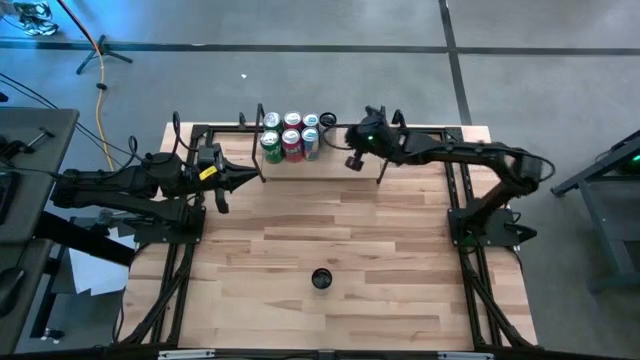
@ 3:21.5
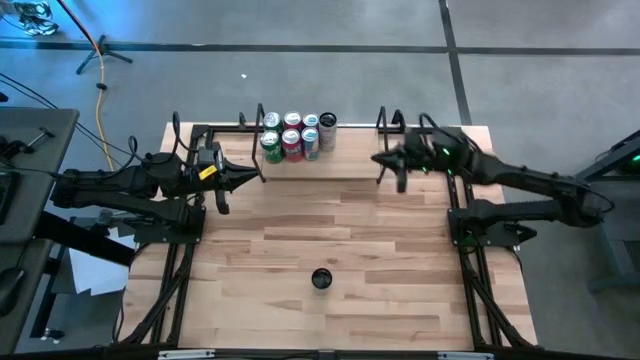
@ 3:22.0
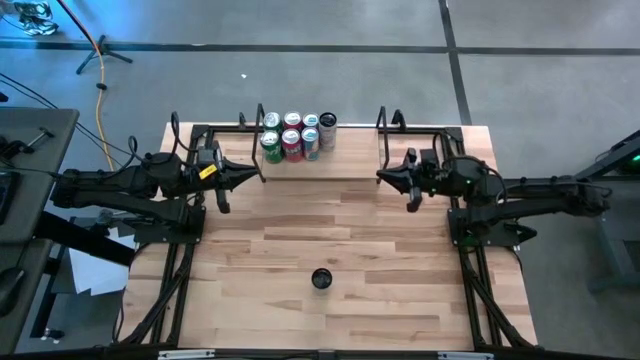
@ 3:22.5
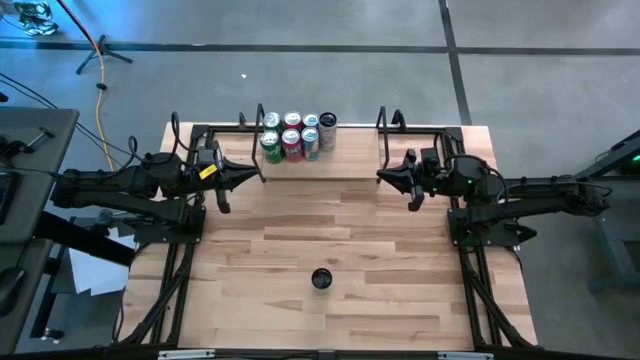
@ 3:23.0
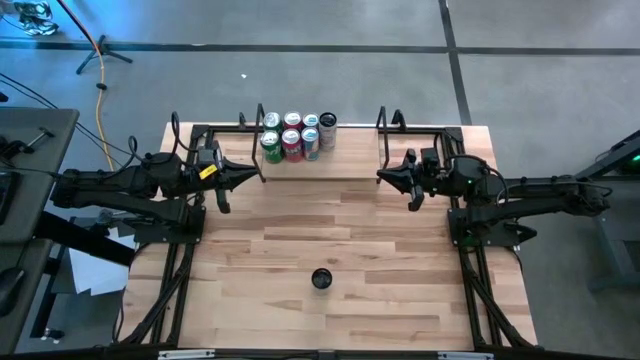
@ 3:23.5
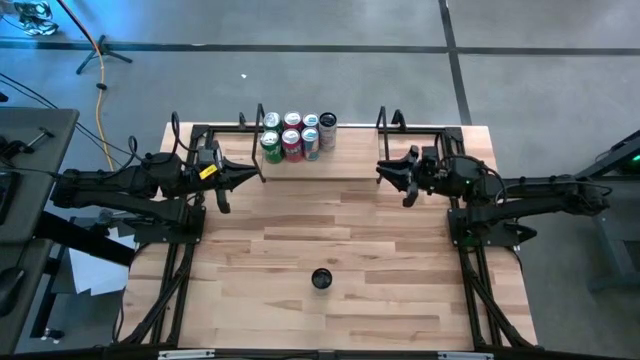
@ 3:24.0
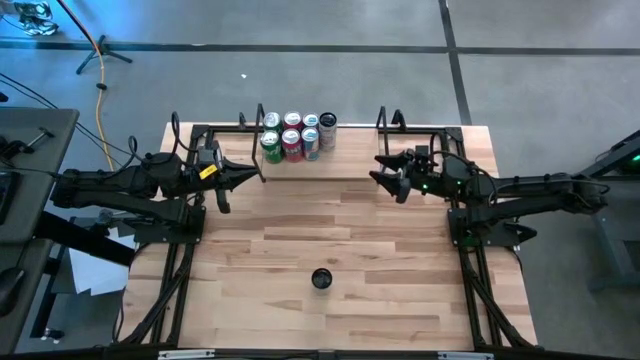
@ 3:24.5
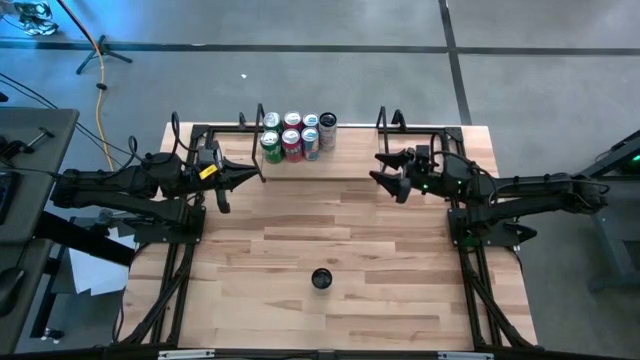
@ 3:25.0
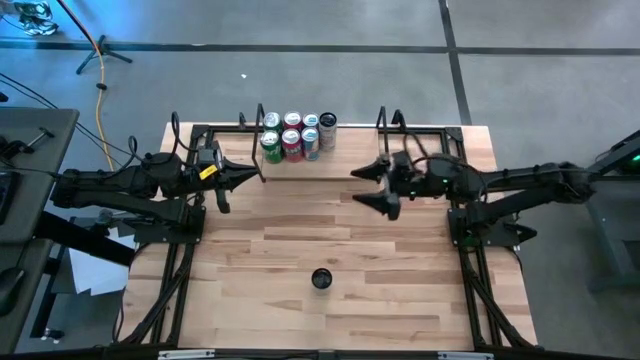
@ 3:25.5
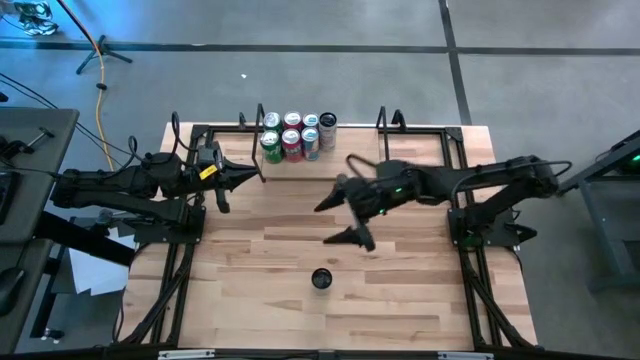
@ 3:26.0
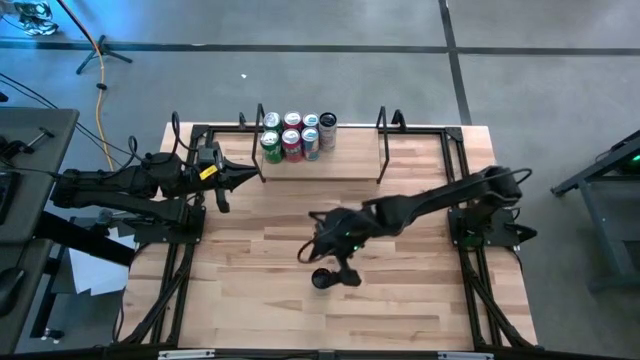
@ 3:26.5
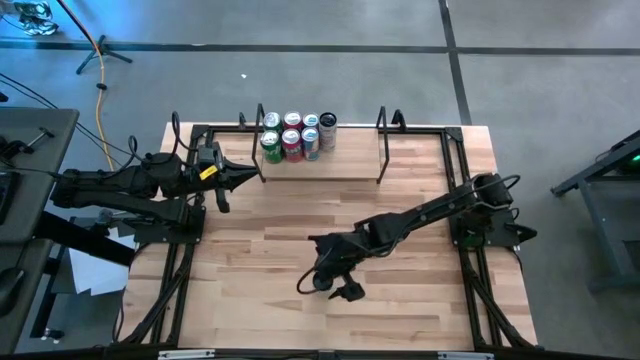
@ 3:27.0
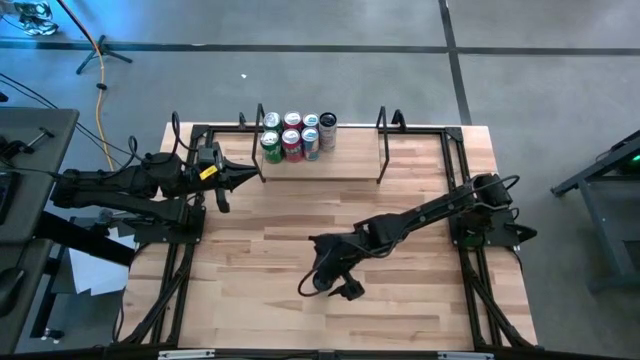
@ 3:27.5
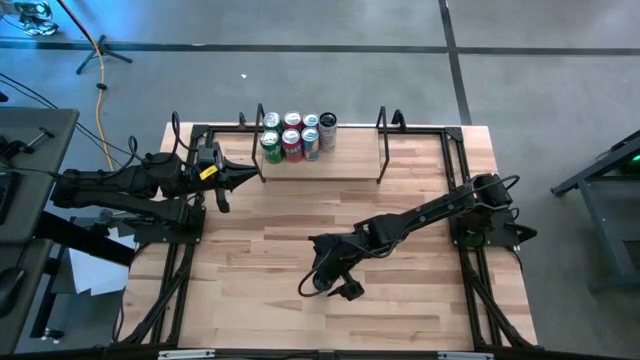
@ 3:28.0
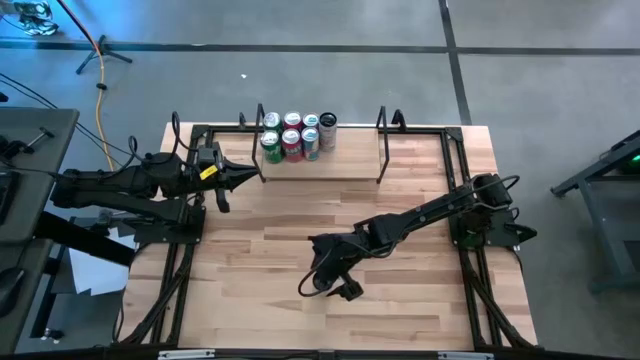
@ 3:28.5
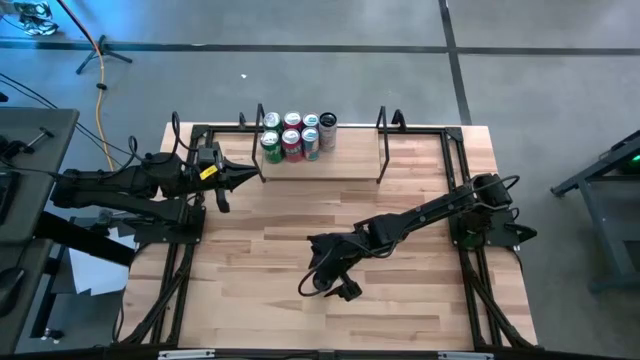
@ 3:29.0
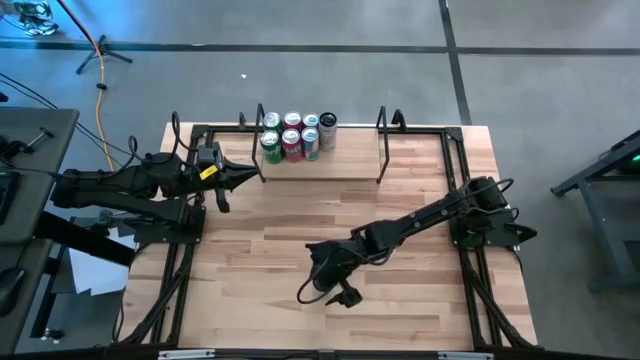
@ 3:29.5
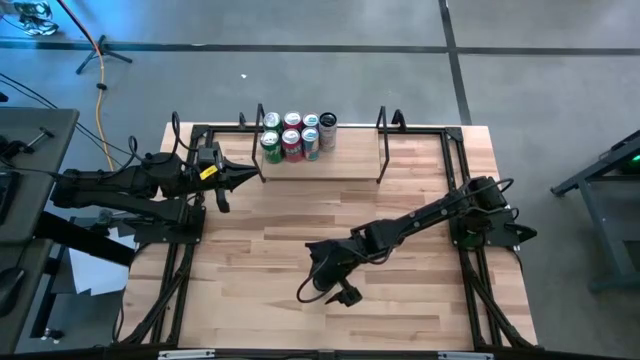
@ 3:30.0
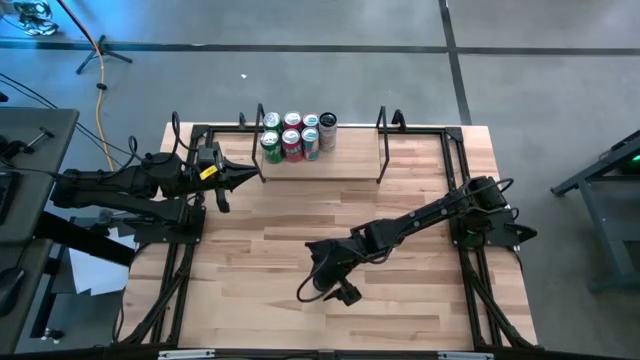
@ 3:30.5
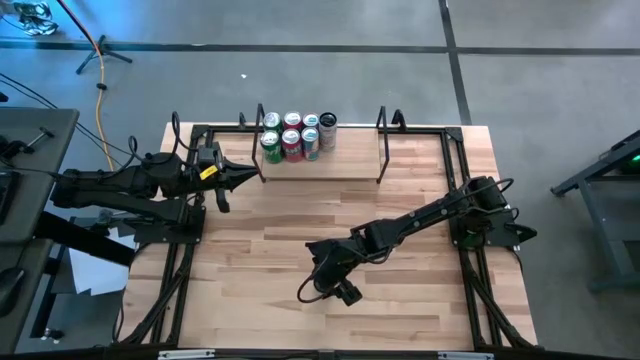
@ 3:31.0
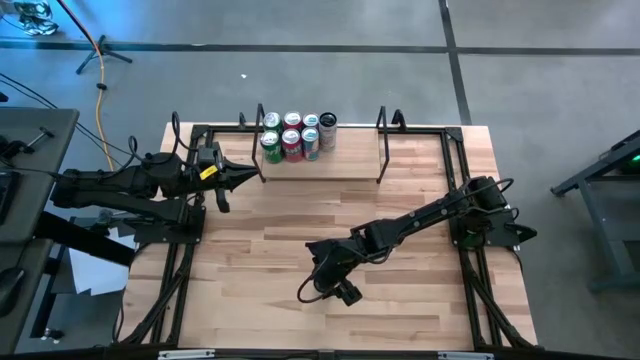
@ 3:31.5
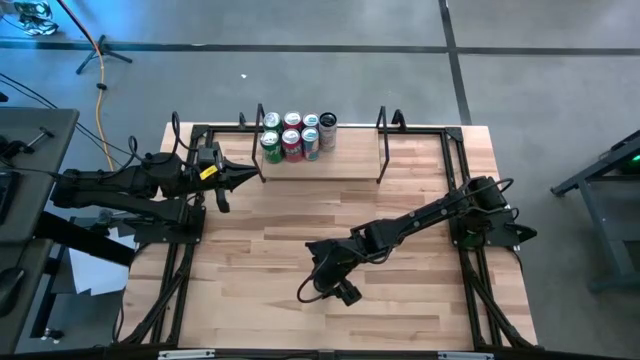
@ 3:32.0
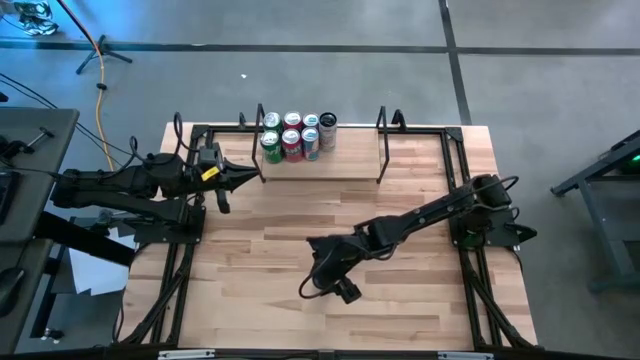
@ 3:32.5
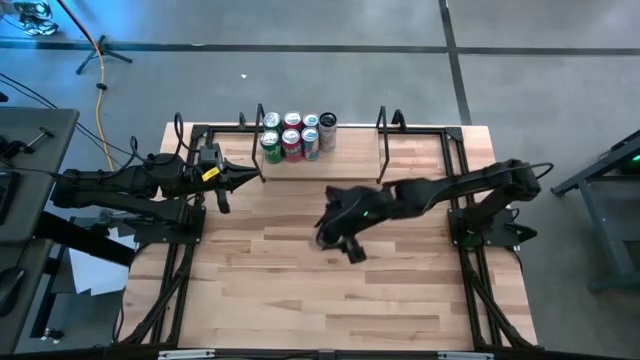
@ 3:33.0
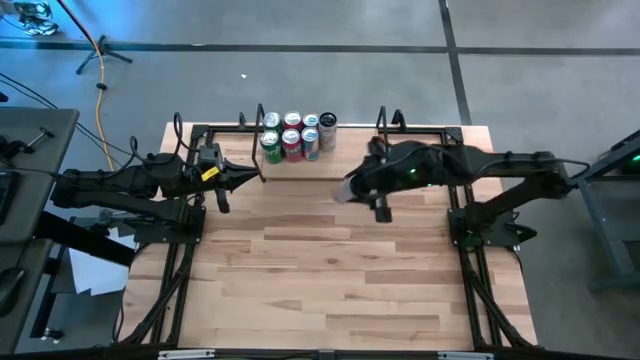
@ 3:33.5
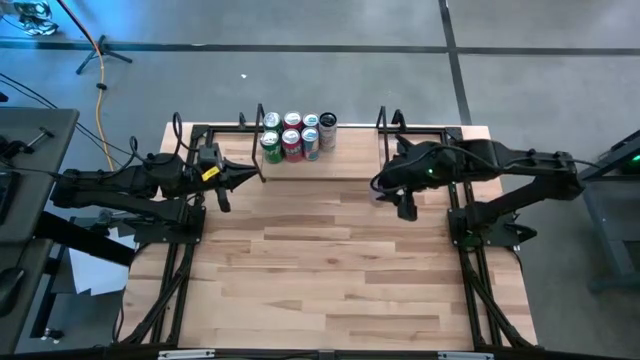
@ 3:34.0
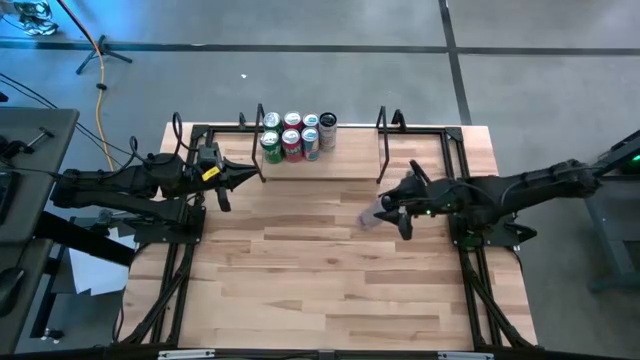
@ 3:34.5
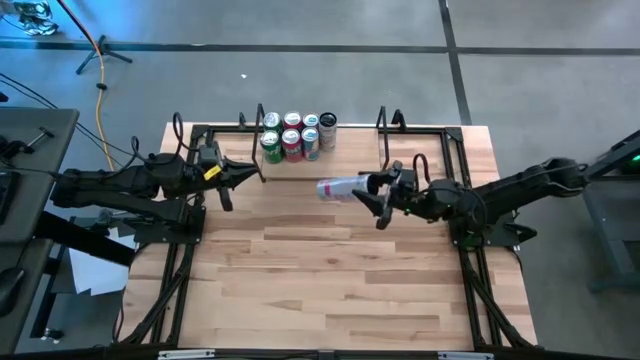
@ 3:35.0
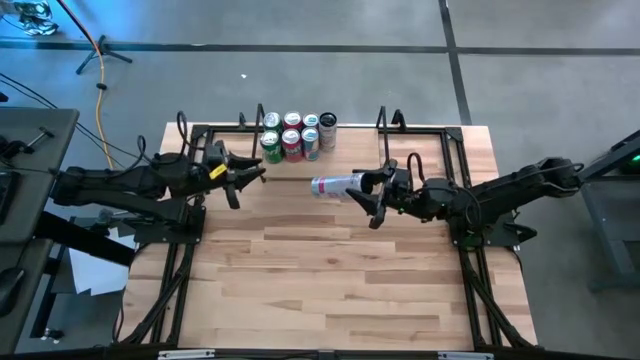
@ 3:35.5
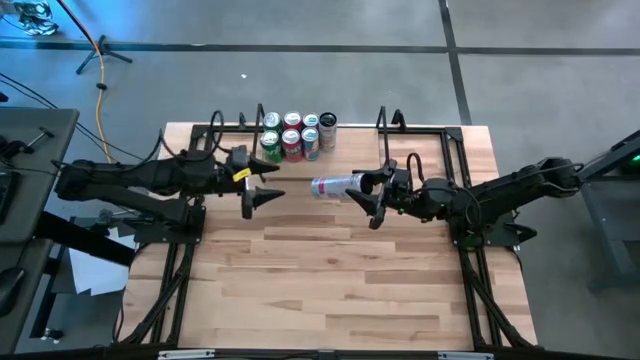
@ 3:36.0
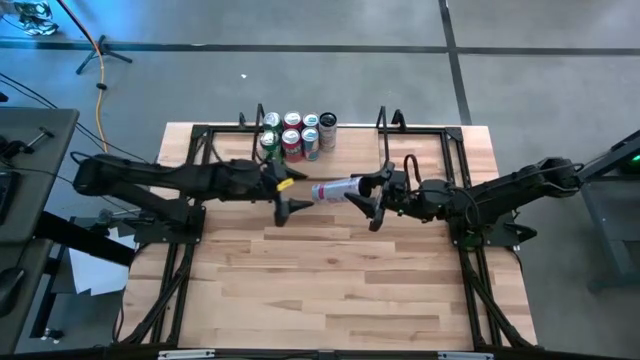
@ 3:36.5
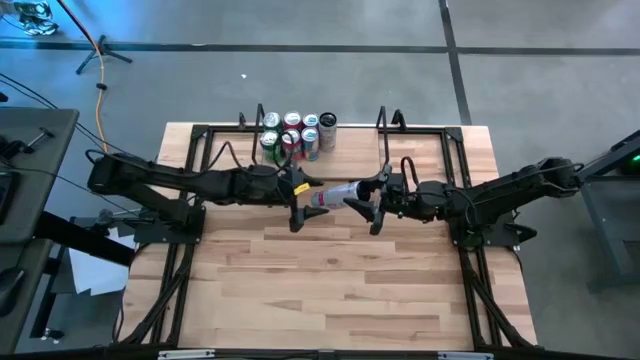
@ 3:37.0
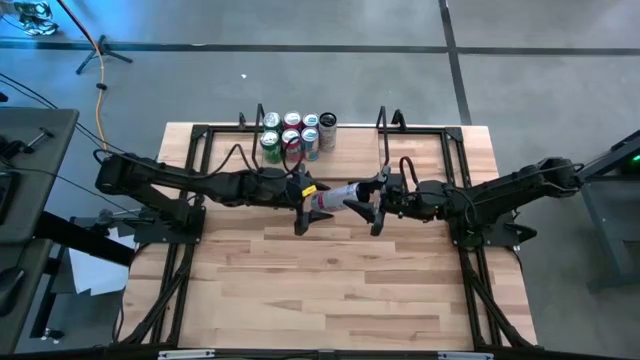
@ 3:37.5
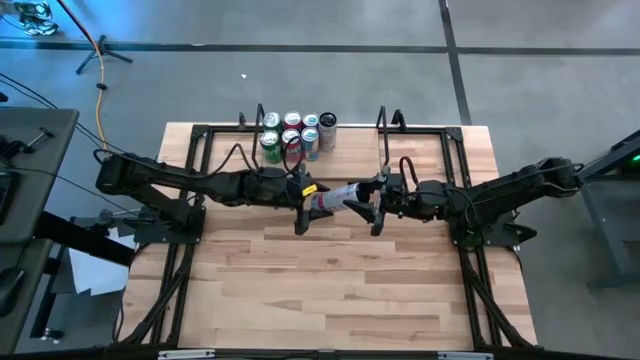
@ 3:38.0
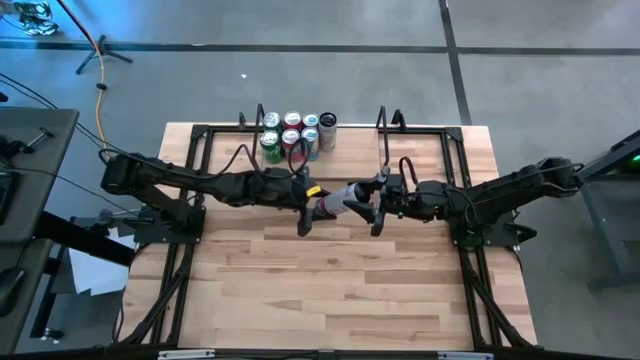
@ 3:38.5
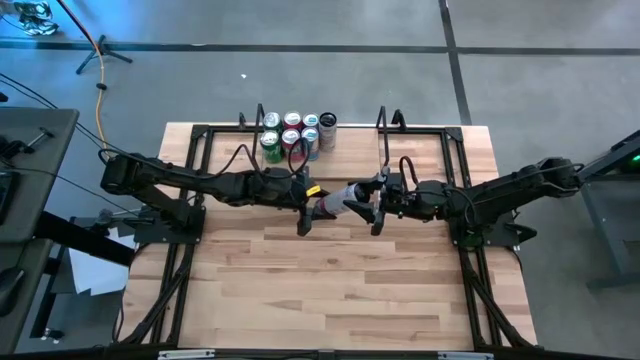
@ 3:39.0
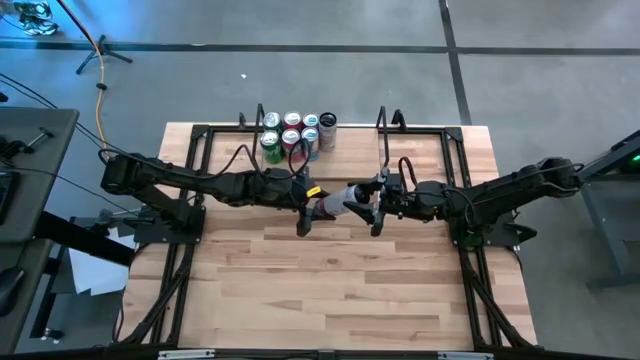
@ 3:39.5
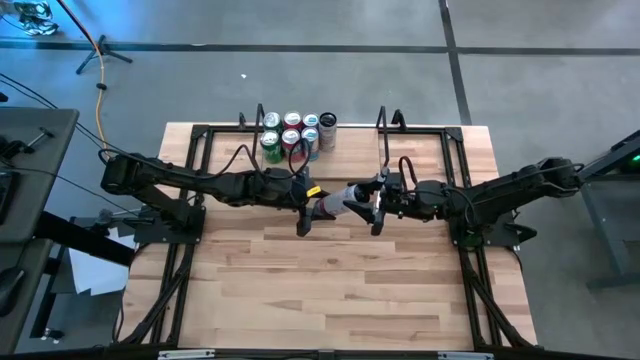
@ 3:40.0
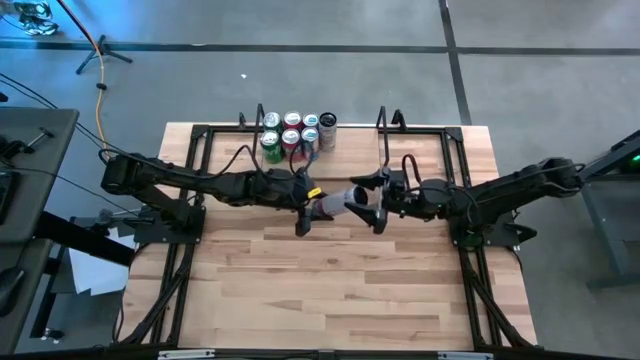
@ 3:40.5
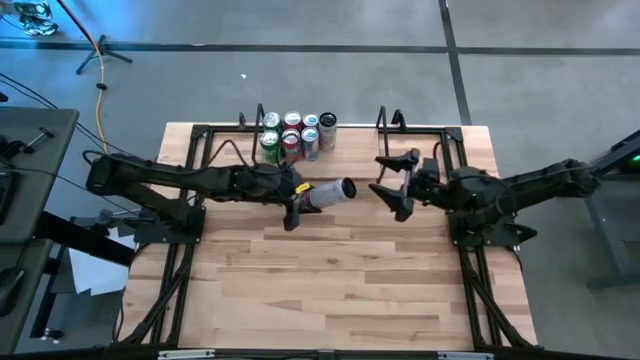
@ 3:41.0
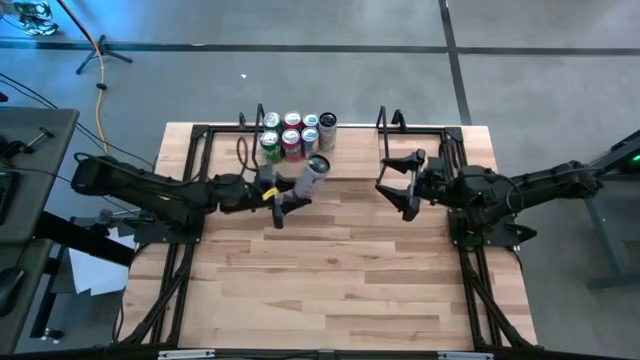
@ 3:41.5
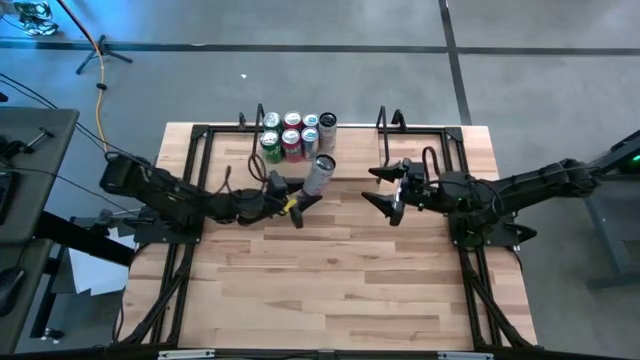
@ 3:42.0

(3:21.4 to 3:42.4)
Task: Place canned beverage on shelf
Put the white pink soda can on the shelf aligned with the white pink soda can
